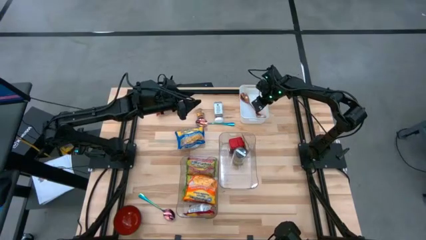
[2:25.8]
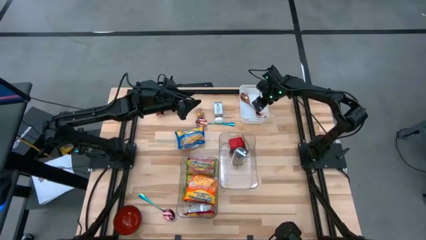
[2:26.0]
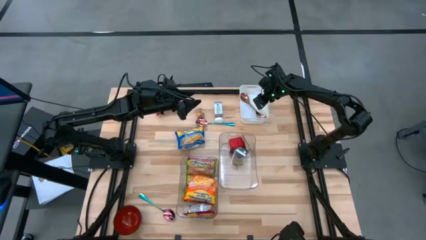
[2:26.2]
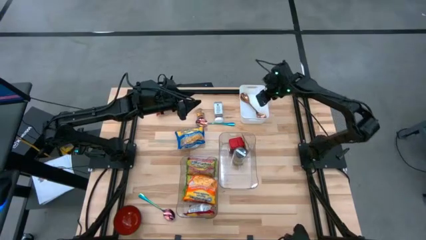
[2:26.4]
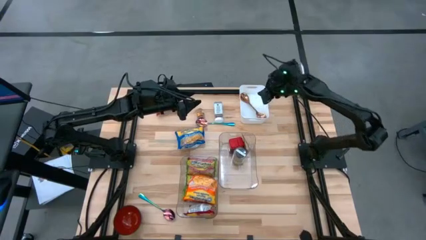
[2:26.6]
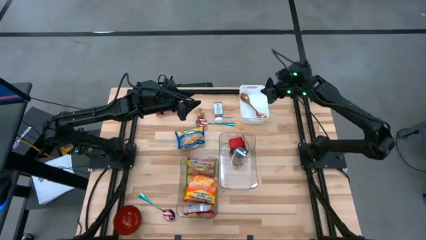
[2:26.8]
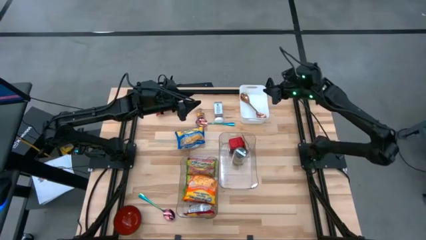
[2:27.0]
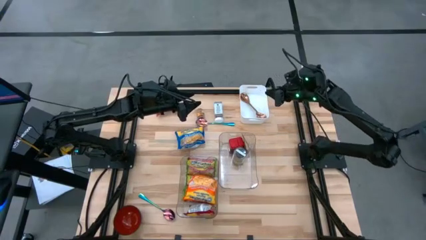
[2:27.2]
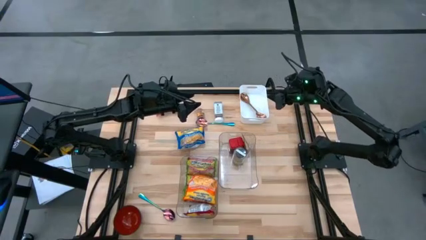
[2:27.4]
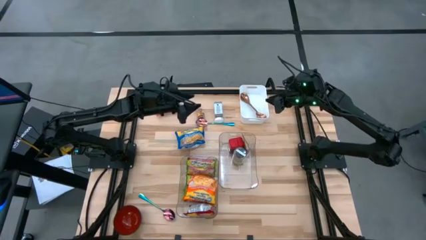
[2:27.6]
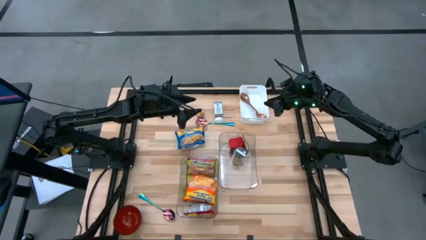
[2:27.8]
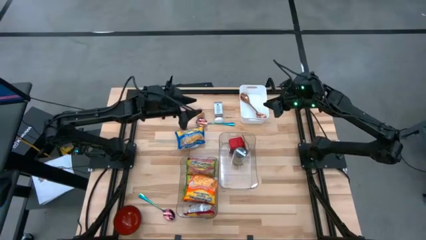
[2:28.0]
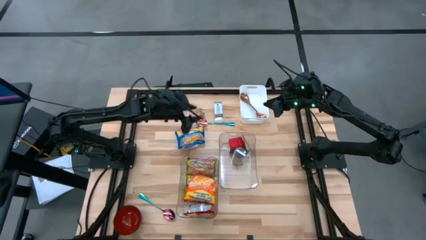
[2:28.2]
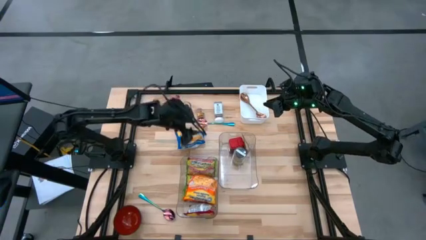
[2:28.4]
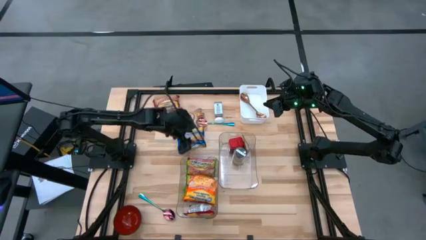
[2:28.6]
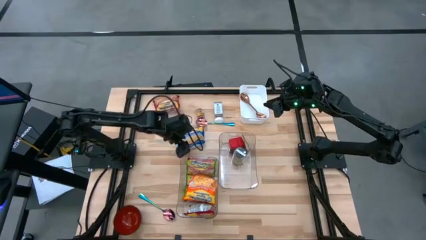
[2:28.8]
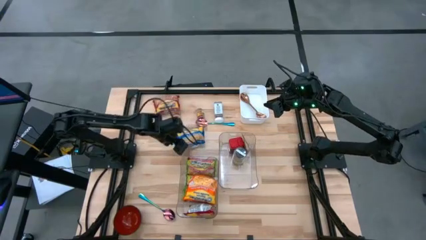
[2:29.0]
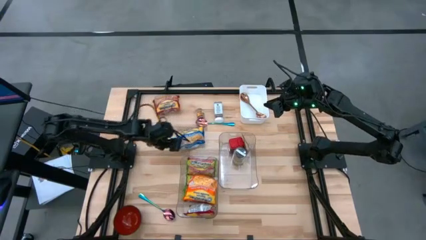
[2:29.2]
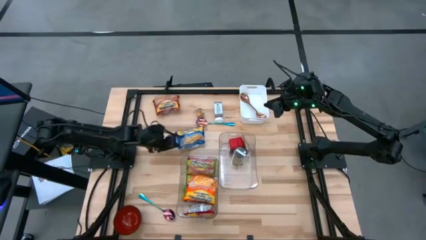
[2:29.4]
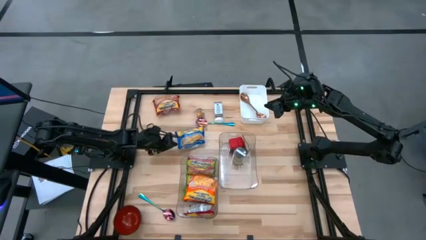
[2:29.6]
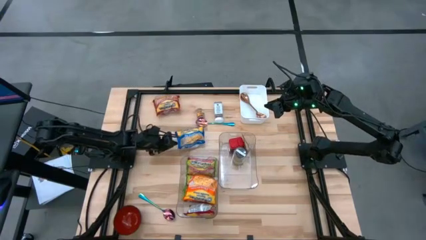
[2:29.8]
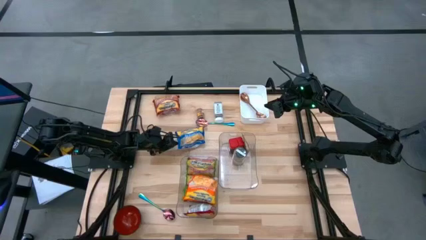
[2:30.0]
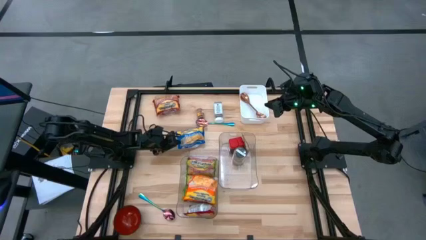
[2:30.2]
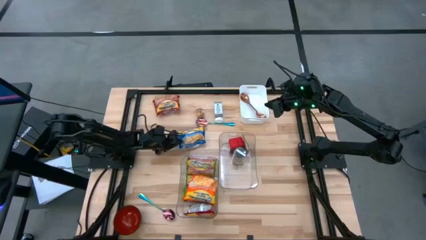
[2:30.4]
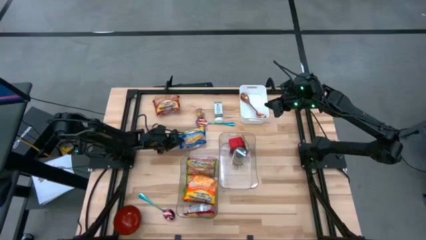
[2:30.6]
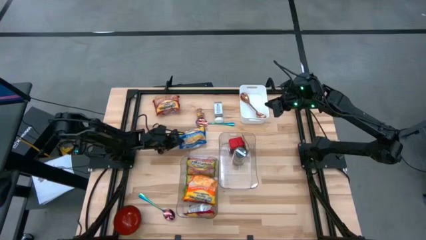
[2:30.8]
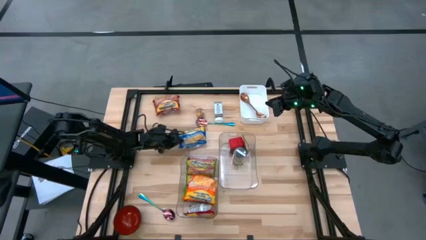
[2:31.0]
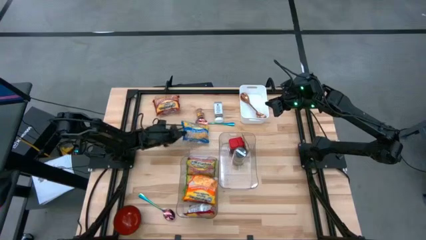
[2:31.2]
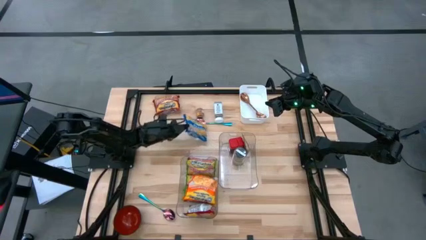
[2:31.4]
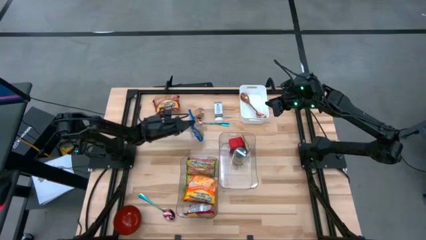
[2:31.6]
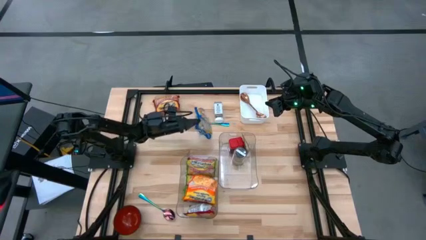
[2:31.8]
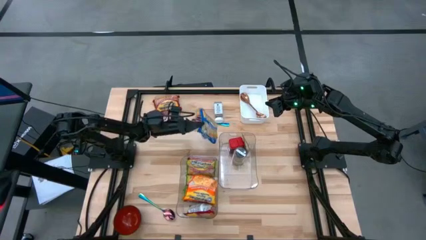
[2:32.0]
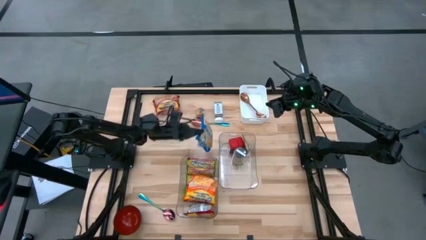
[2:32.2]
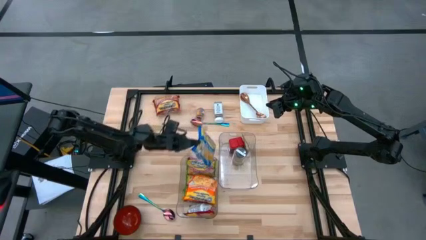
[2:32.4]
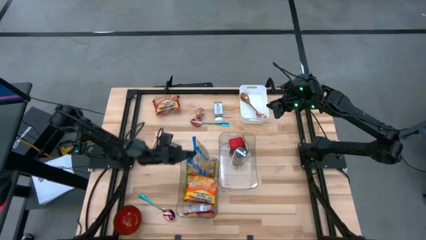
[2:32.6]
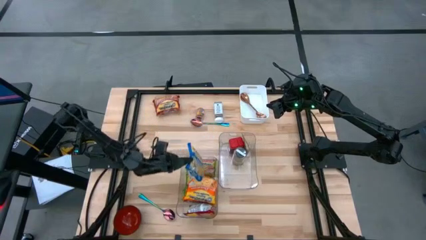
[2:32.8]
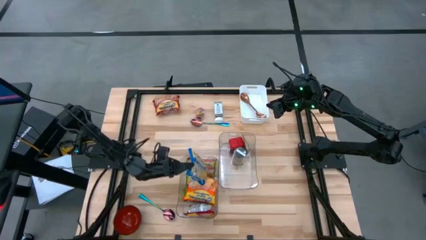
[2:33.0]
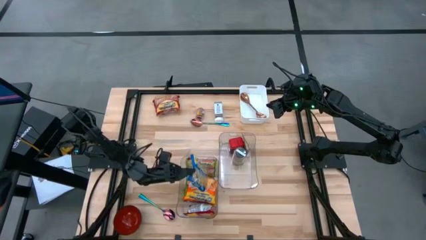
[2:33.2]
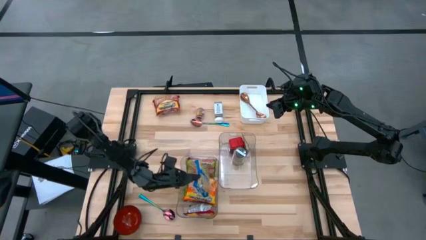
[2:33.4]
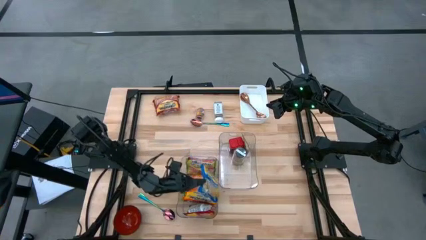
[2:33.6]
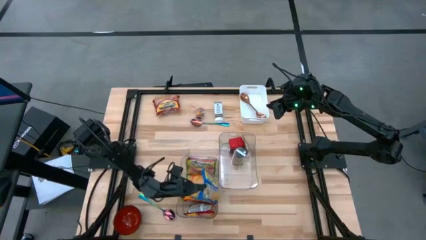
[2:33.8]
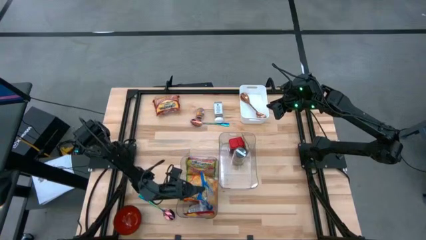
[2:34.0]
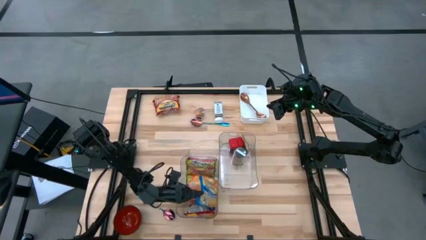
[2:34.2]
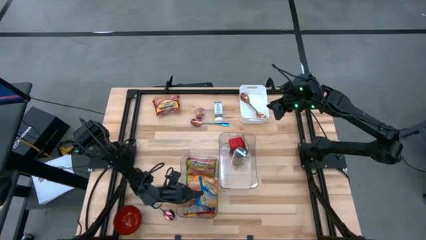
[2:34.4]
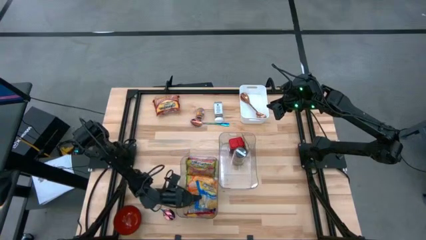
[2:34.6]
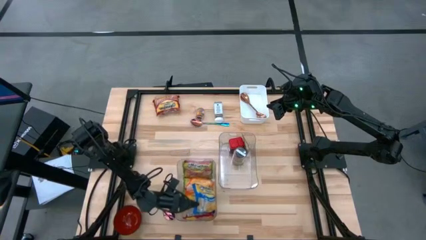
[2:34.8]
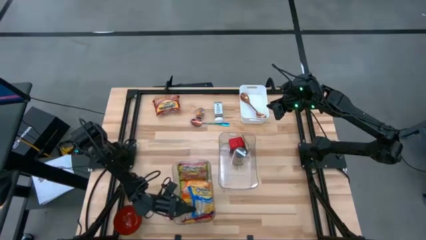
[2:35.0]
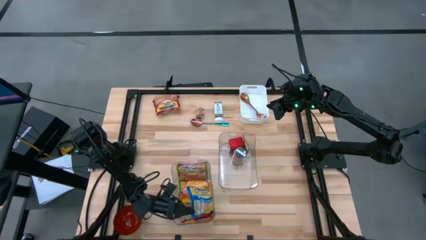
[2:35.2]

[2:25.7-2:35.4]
Task: Pick & Place Food Item
Put the blue noodle pack into the left transparent bin

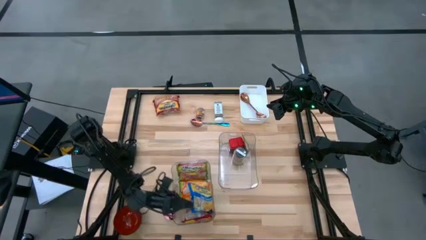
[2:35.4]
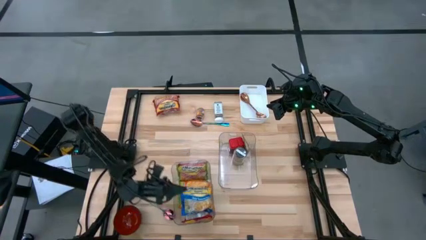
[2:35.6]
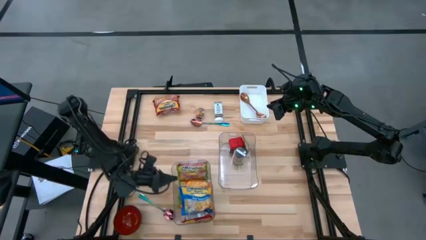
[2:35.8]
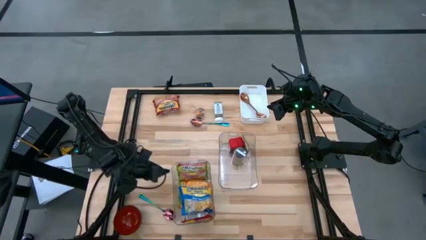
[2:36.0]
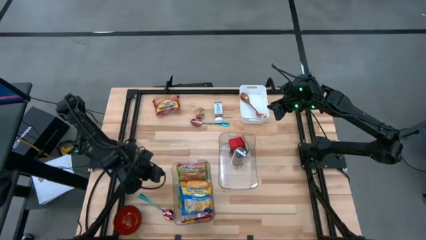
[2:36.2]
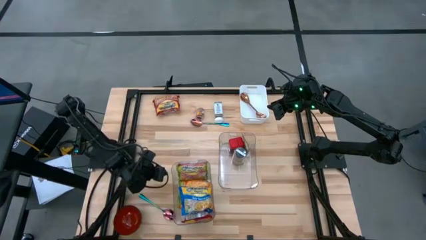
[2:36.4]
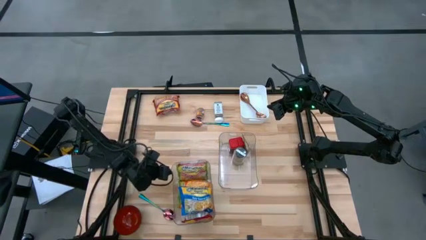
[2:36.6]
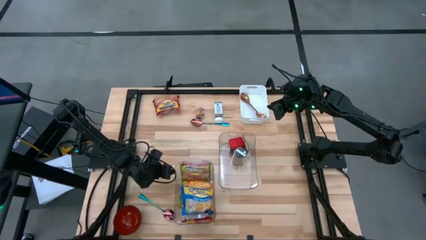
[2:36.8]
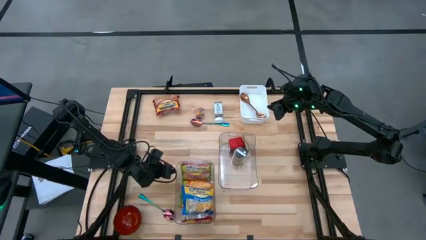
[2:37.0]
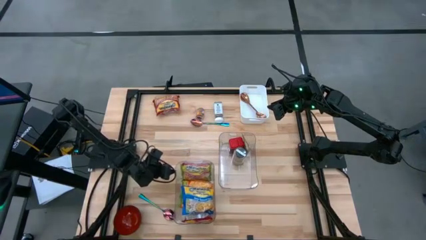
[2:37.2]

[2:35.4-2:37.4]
Adjust the left transparent bin on the table

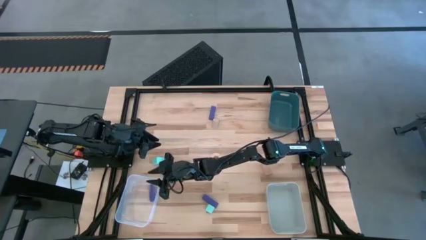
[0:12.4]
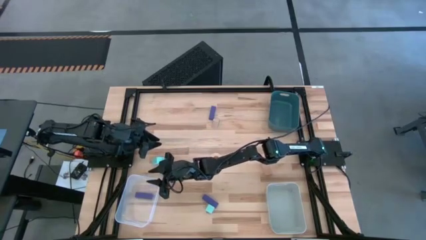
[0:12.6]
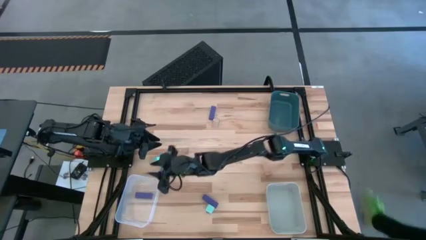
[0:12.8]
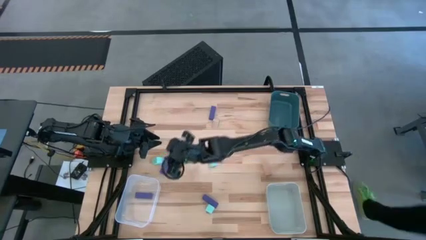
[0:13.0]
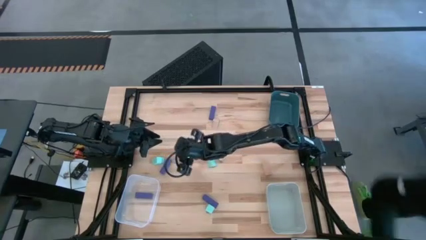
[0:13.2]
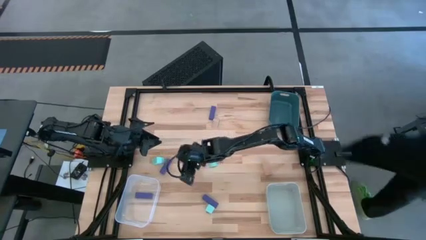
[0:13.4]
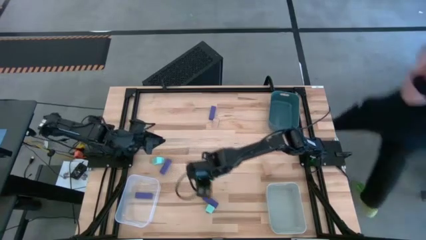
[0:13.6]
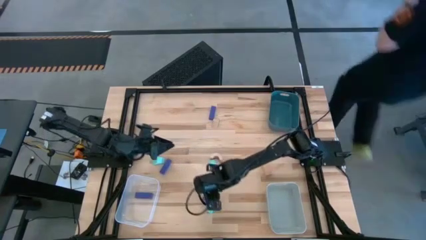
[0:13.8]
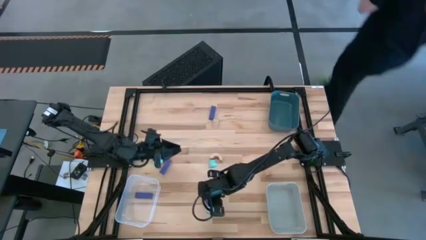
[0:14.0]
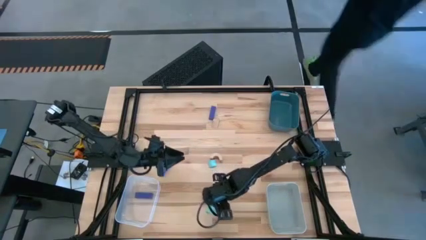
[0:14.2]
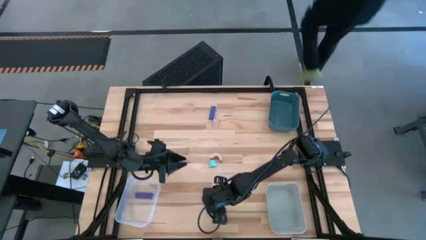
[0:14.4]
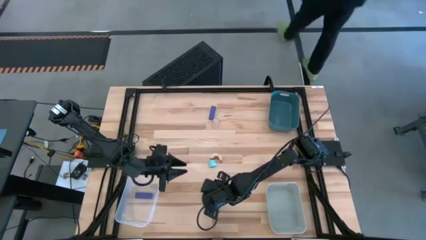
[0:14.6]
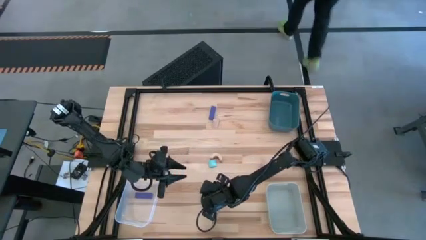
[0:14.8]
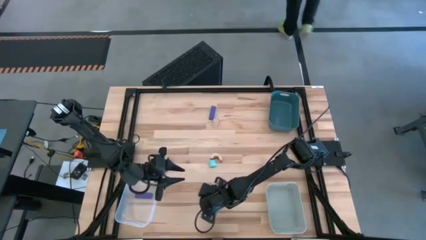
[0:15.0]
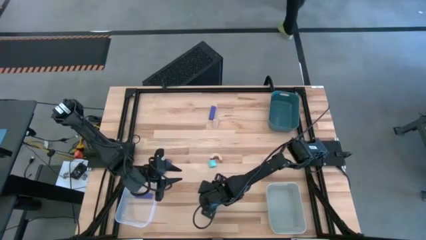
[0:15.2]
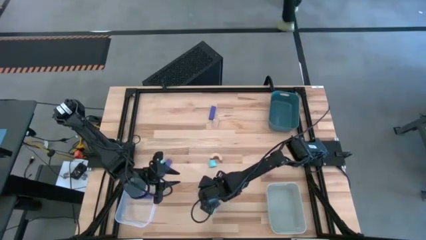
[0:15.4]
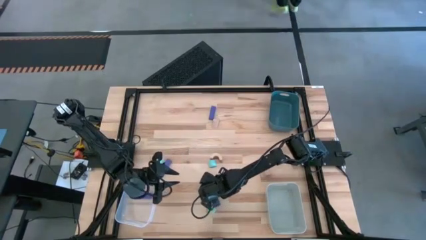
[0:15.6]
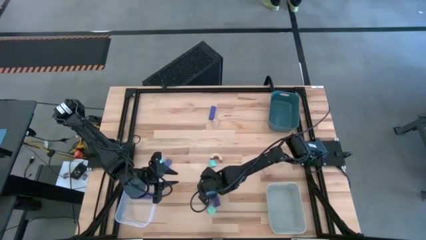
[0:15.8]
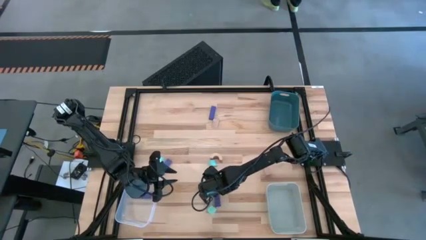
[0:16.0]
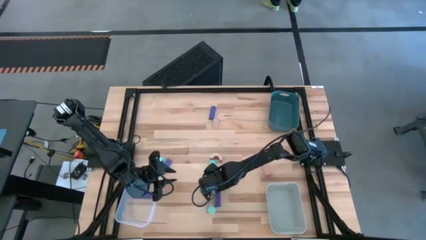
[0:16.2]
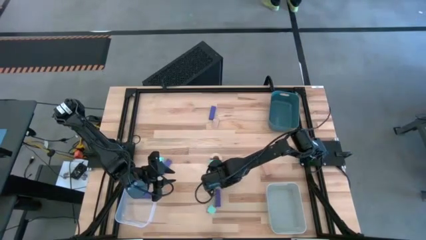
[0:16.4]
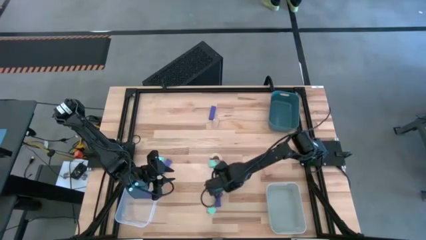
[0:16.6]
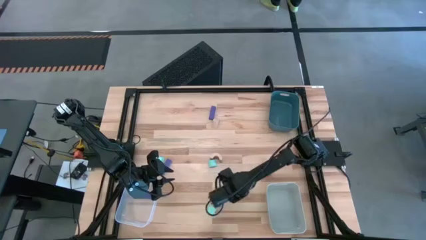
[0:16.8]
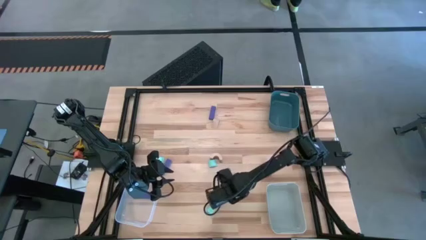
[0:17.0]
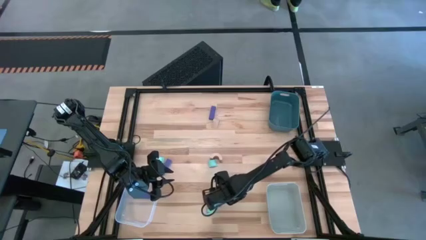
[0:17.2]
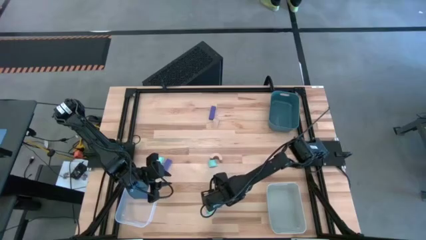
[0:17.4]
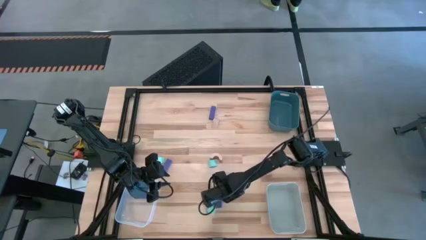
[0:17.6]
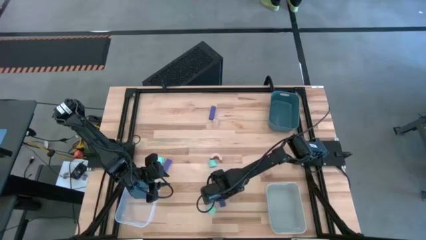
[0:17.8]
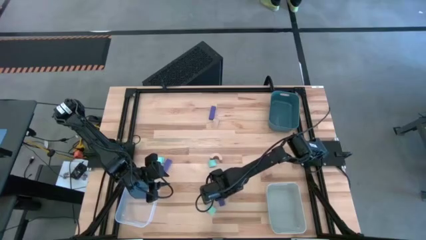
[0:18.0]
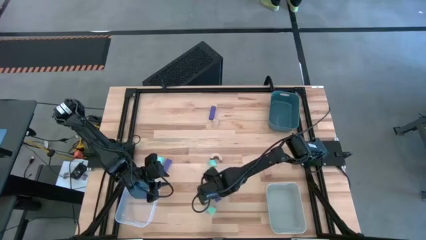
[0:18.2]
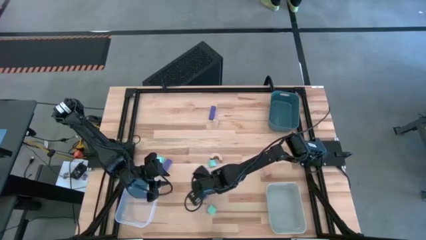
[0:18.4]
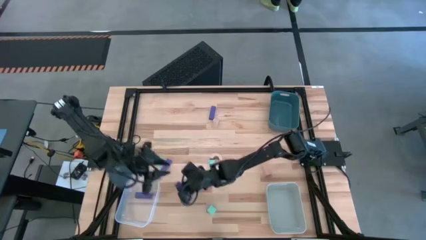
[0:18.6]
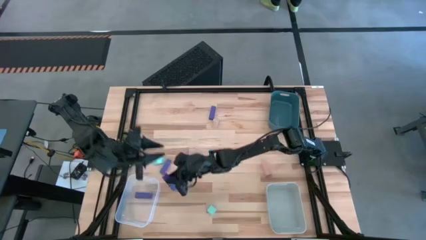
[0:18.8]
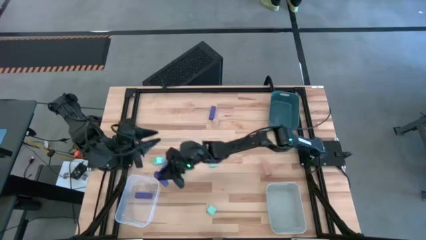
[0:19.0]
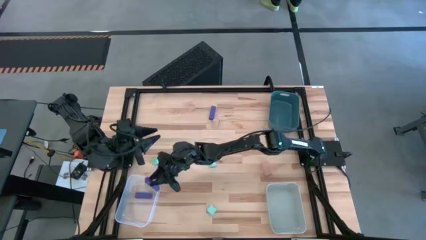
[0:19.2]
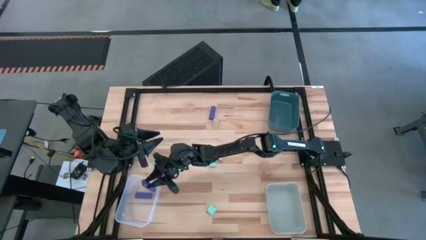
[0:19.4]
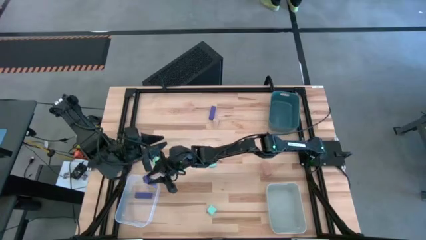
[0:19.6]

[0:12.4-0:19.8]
Task: Sort & place blocks by color
Put the bottom purple block into the transparent bin
